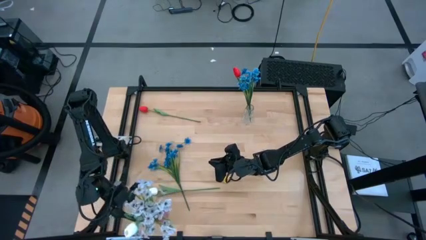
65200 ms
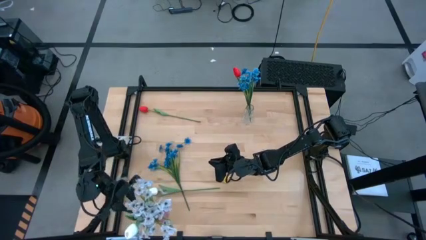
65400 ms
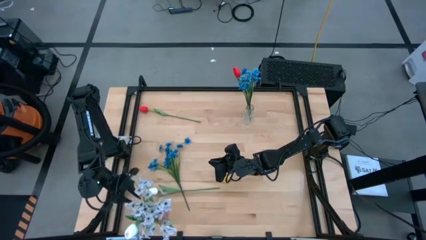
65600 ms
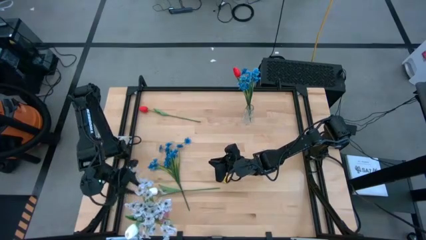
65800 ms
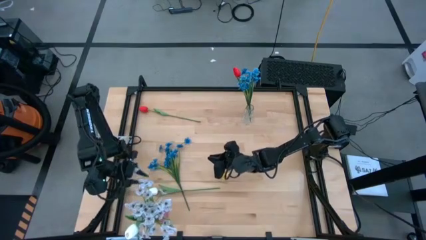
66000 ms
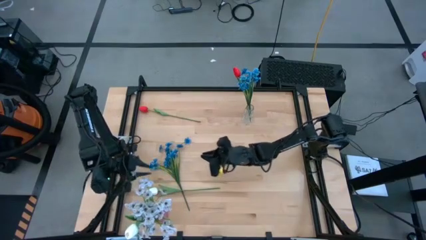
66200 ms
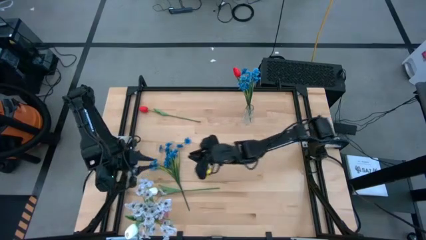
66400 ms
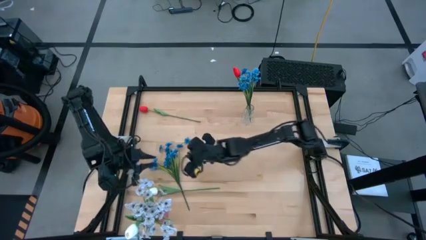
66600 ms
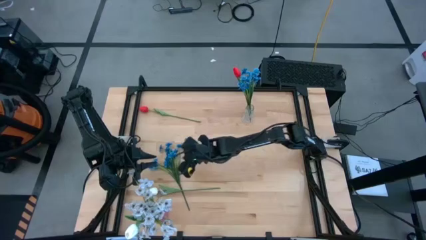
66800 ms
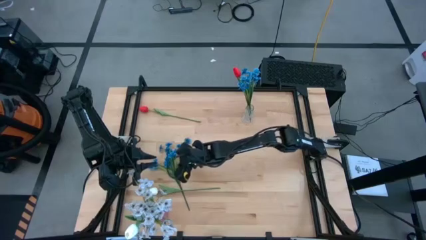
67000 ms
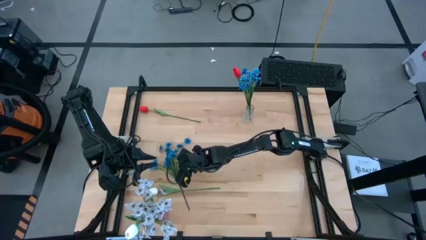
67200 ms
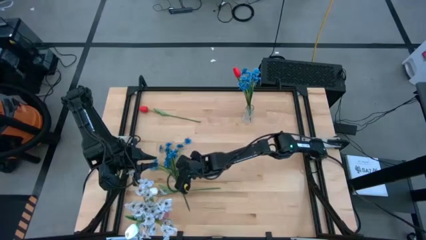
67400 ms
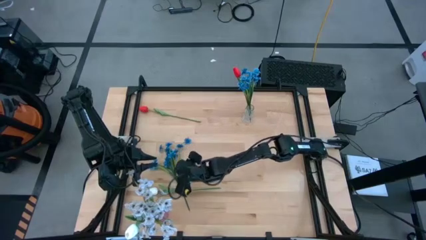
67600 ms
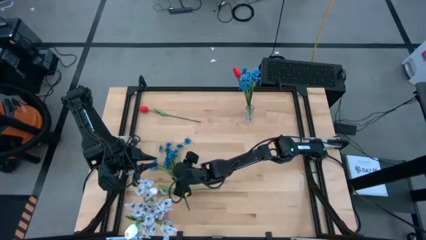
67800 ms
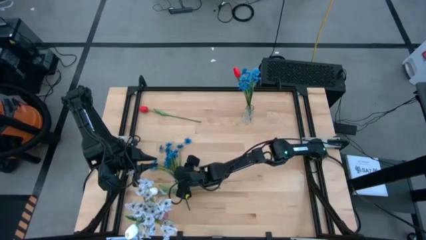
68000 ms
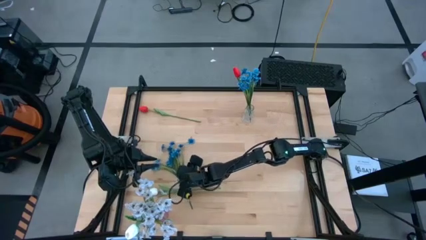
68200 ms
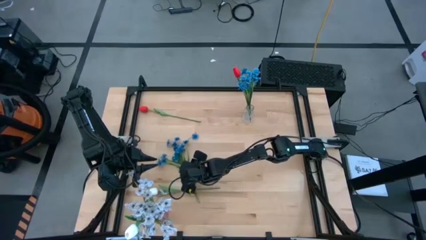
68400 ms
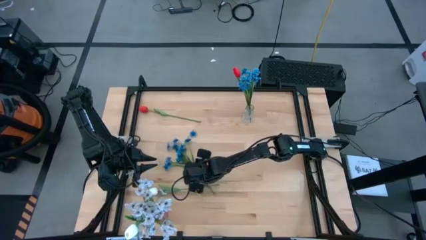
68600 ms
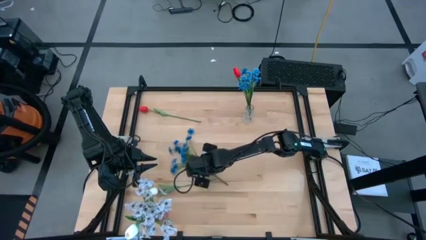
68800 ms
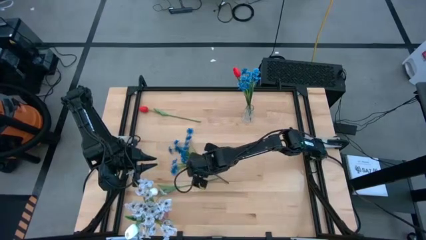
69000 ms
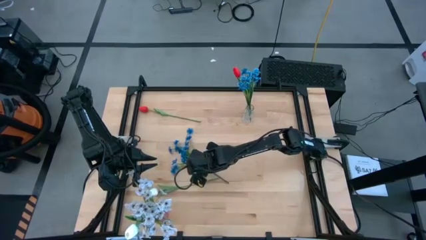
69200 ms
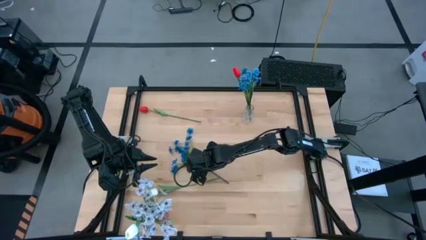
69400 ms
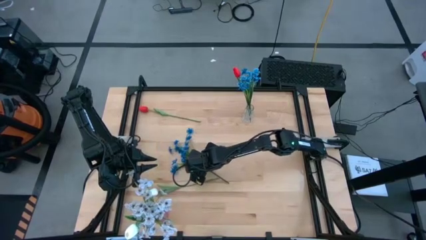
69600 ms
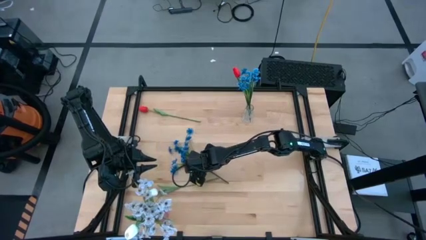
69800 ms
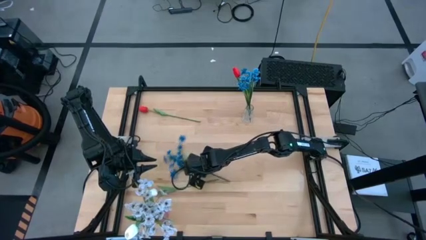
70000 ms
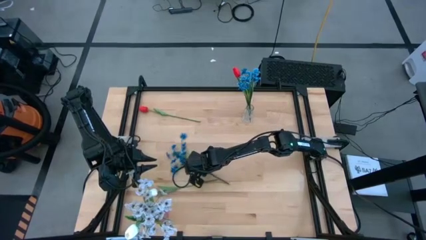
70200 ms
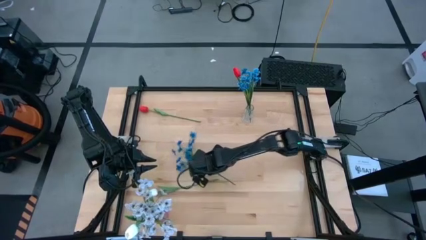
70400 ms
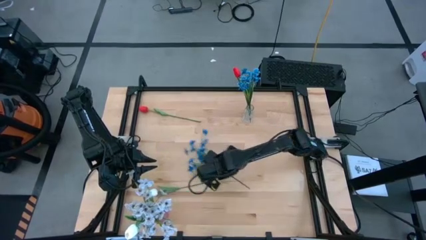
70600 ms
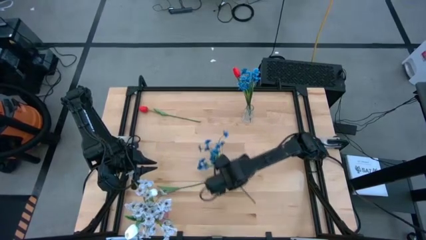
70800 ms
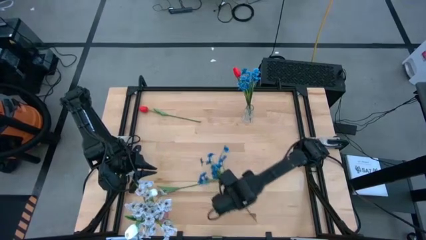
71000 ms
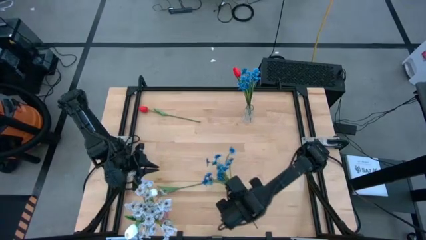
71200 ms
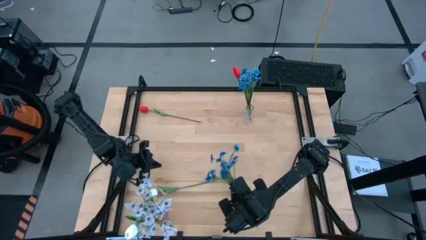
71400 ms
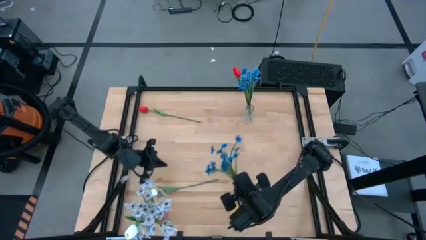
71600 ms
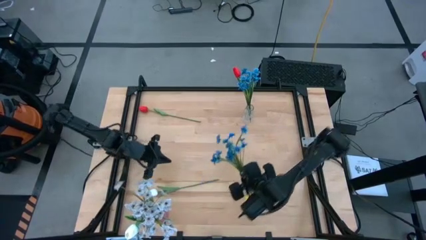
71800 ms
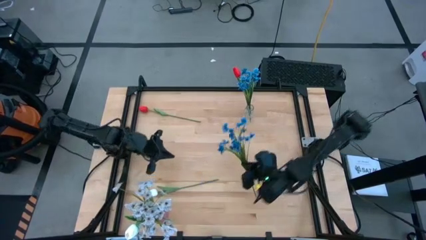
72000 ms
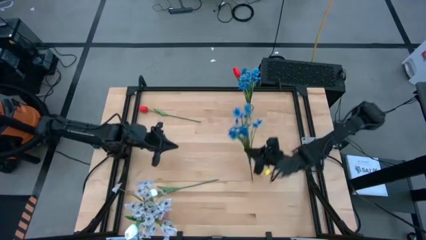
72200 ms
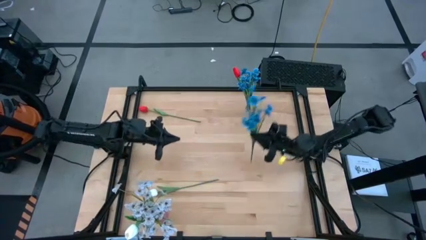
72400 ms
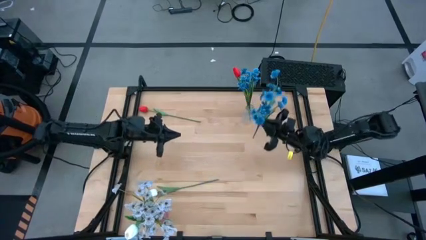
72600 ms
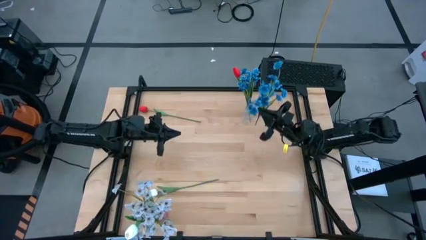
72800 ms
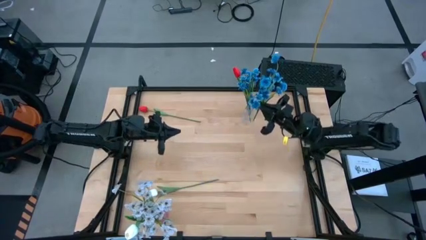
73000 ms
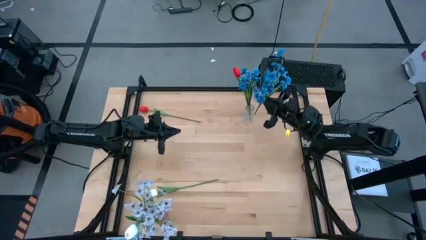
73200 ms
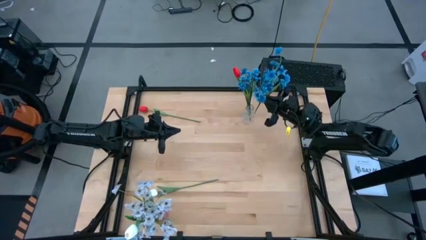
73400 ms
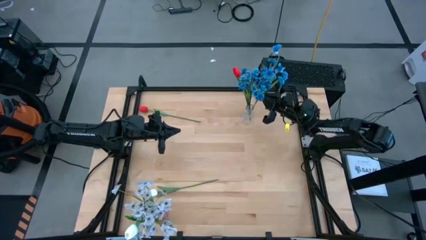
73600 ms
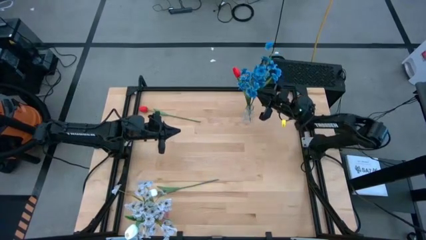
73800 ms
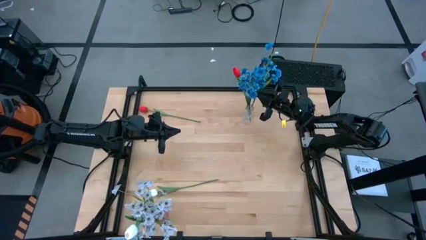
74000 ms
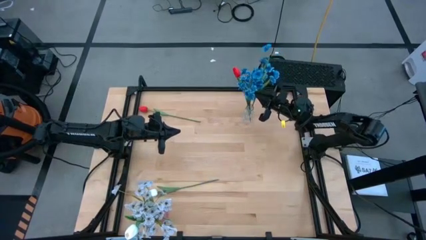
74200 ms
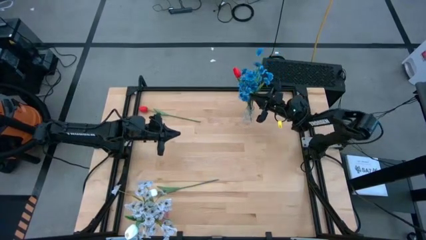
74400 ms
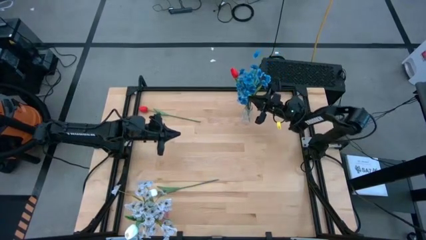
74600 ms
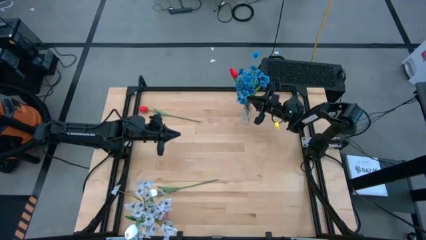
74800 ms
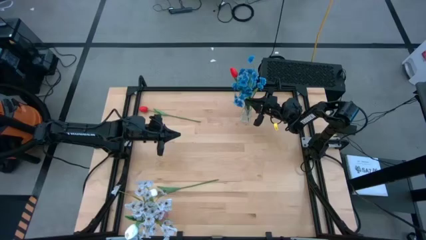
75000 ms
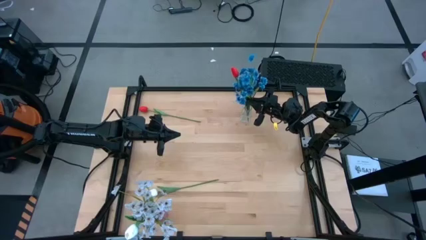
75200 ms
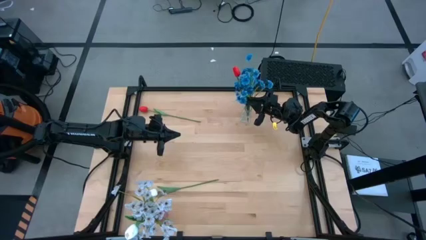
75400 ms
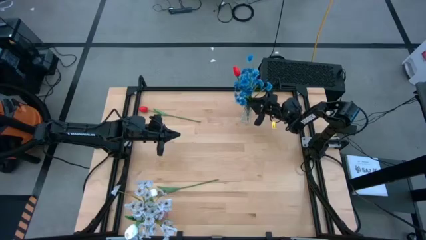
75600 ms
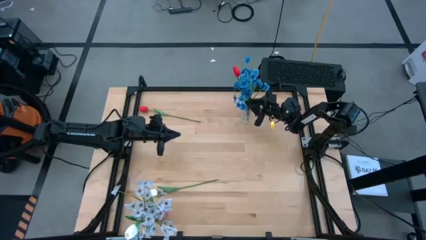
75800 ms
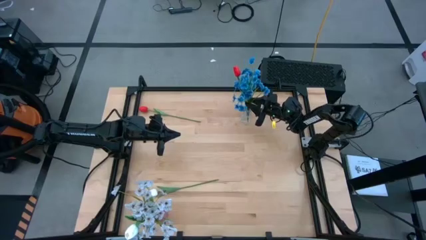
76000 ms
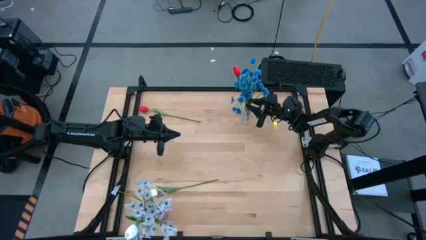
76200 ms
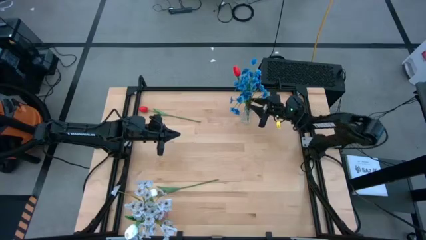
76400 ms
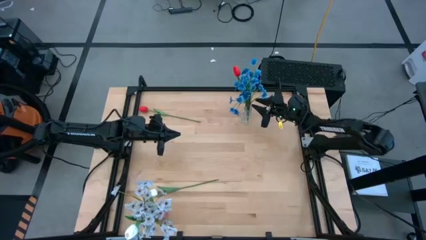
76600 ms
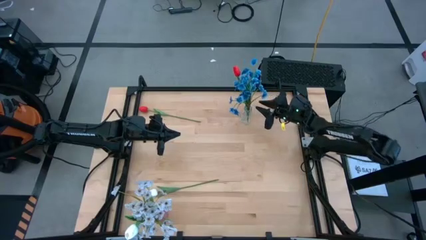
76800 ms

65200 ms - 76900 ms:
Task: Sort flowers into vase by color
Put the blue flowers into the transparent vase

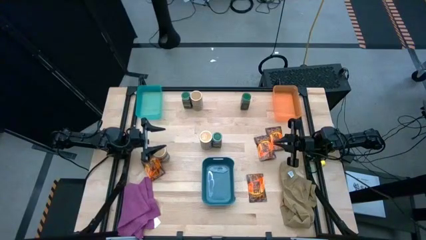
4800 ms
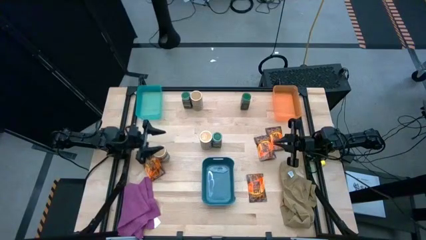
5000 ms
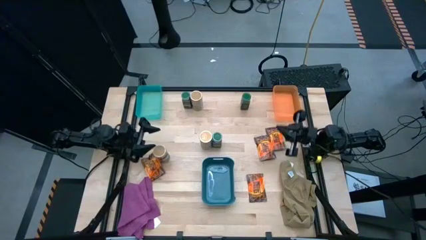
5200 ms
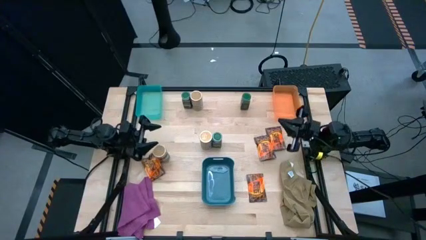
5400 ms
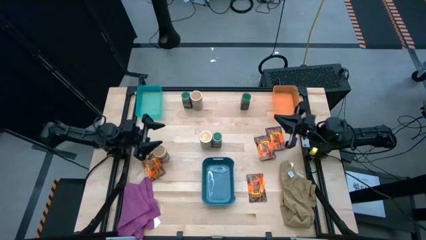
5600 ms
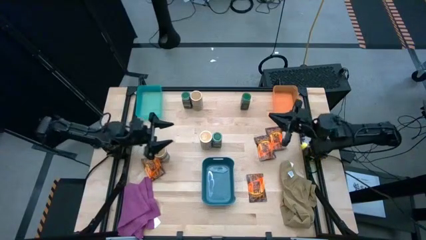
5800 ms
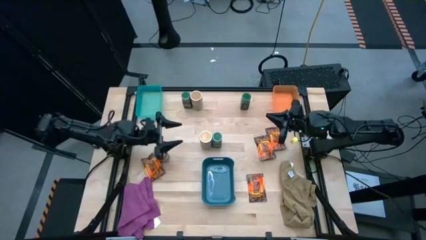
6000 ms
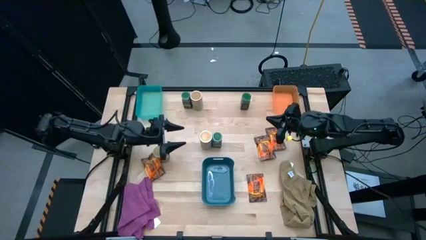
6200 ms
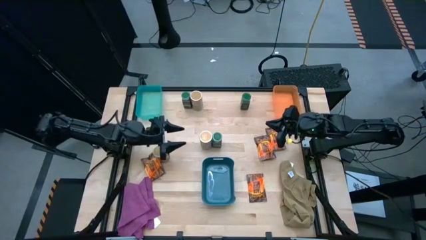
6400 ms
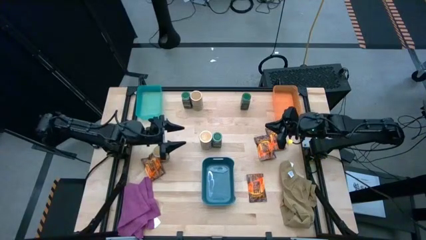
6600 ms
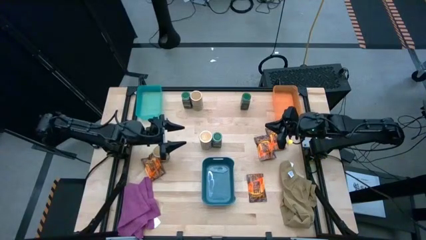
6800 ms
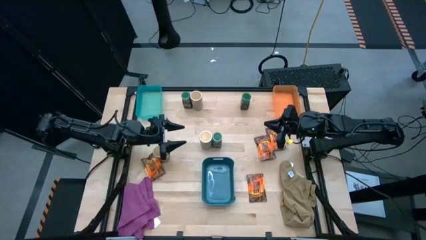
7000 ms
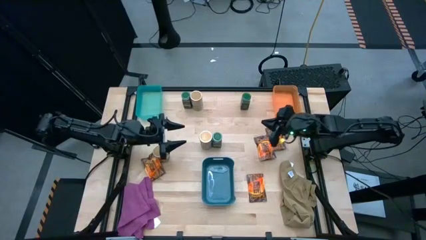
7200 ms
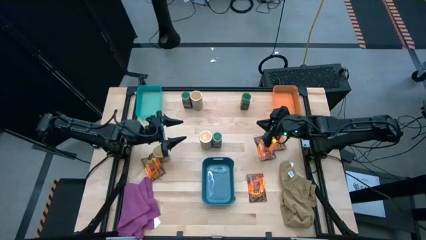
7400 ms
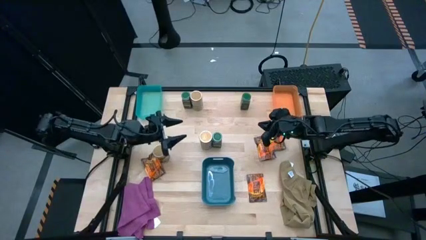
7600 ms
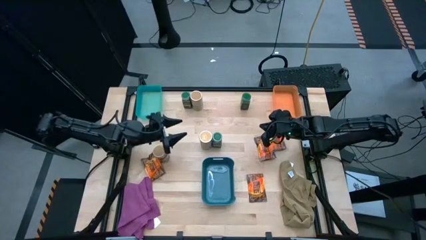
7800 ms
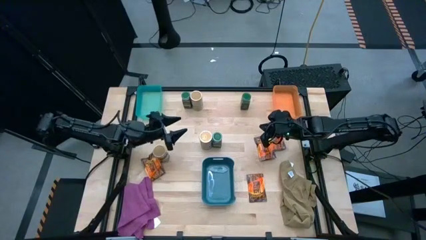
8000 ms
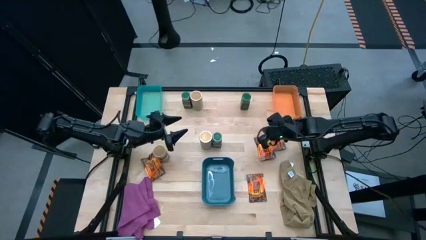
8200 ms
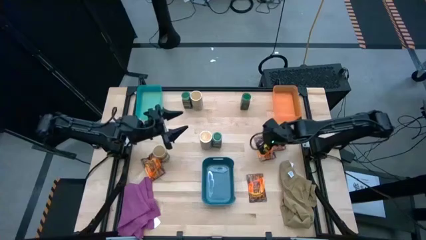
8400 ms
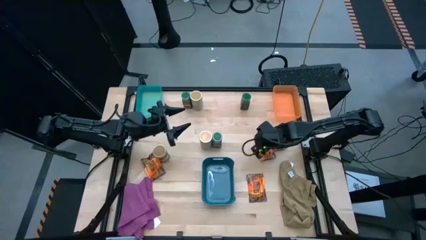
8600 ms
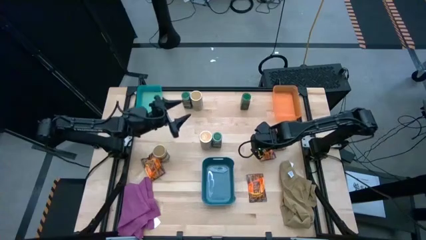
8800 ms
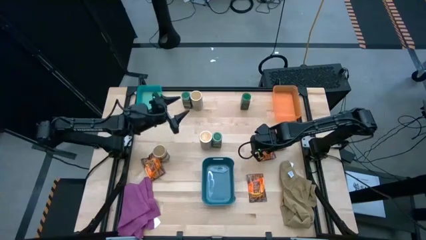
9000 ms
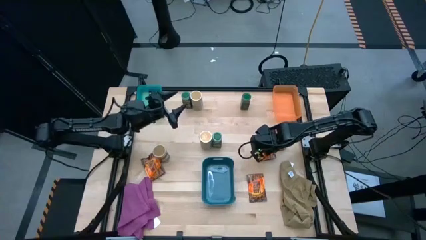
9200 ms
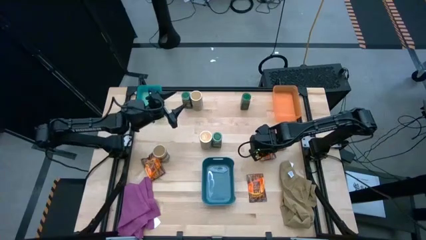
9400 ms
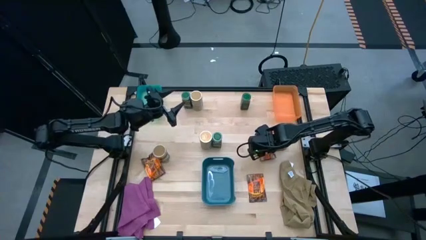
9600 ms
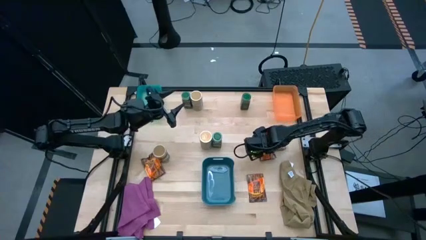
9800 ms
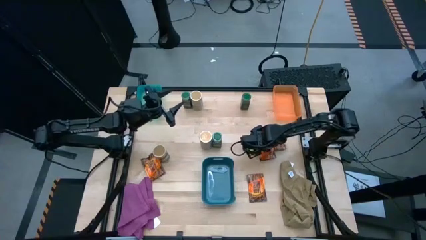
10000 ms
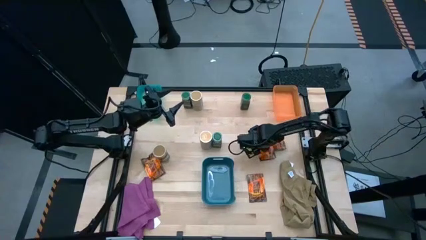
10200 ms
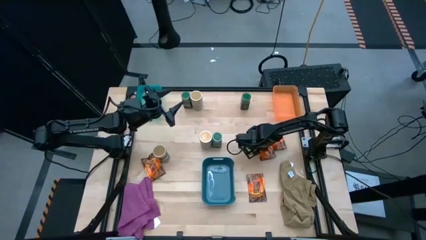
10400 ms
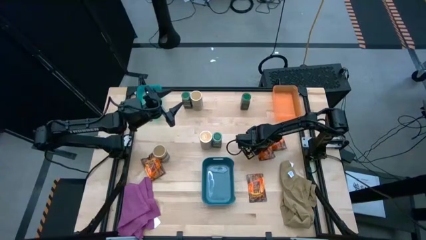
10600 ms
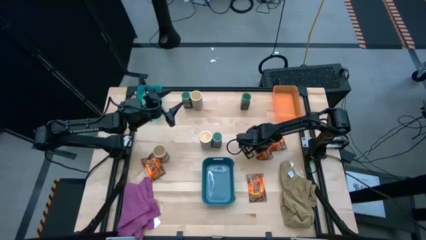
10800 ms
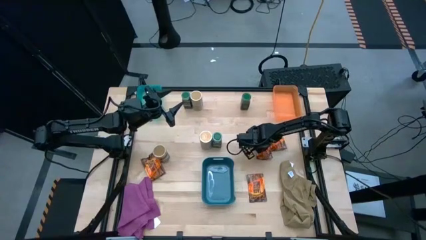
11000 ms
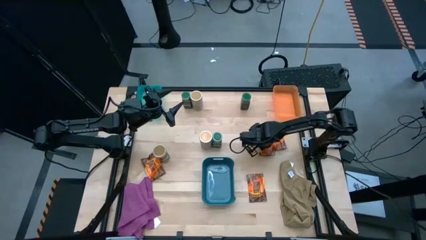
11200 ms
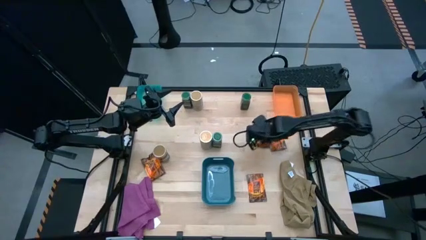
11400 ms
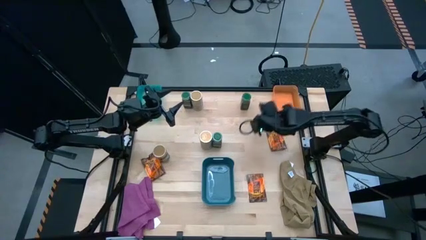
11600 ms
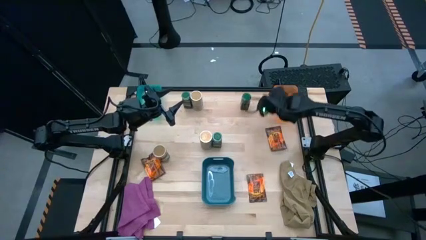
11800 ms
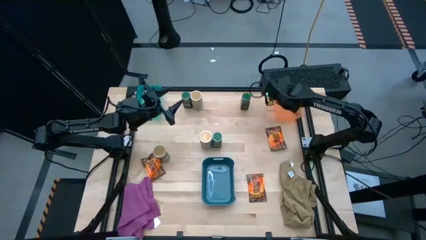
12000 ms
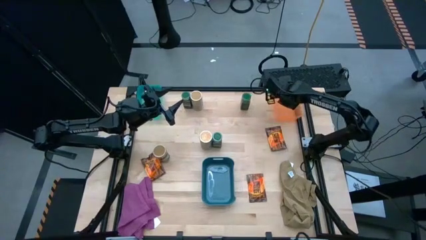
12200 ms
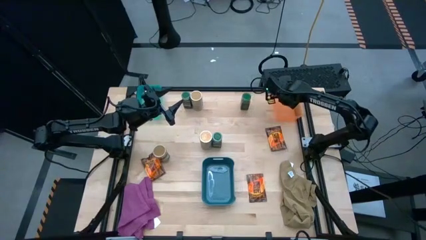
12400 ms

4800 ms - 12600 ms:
Task: Sort spices by type
Put the orange seasoning bag into the orange bin
